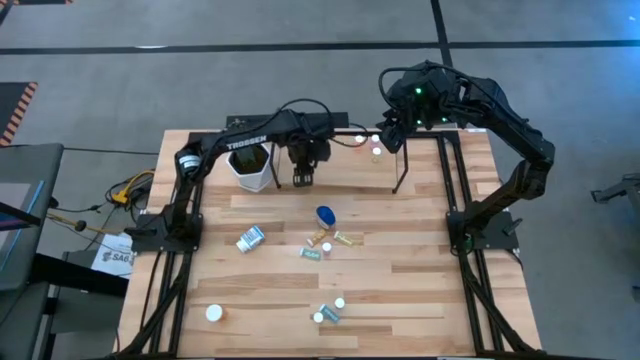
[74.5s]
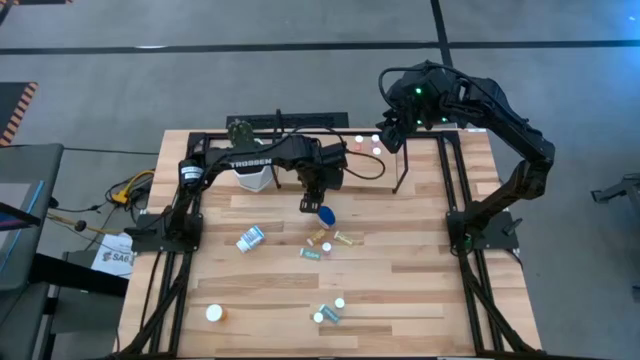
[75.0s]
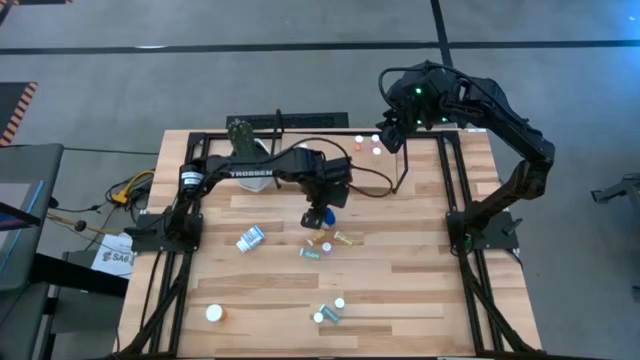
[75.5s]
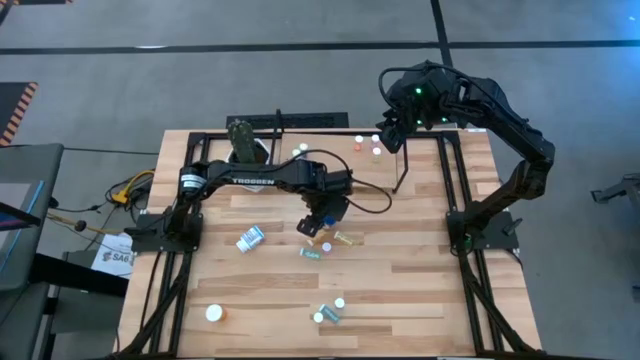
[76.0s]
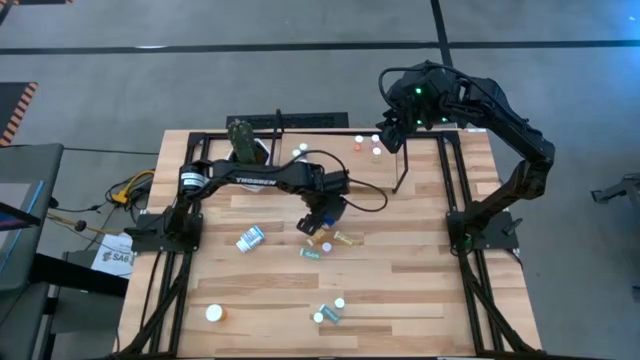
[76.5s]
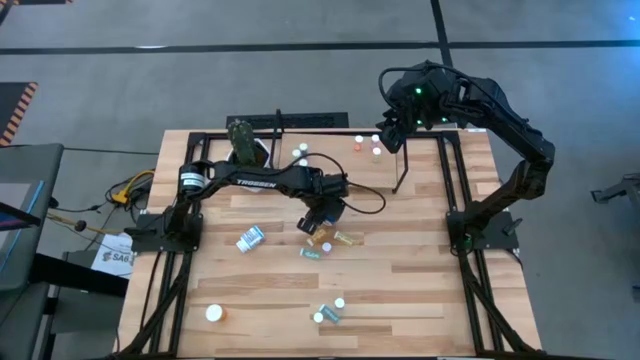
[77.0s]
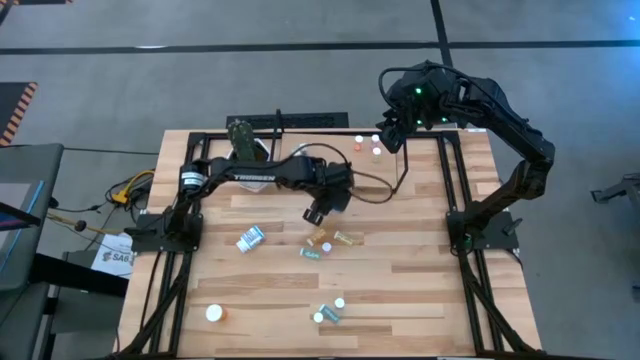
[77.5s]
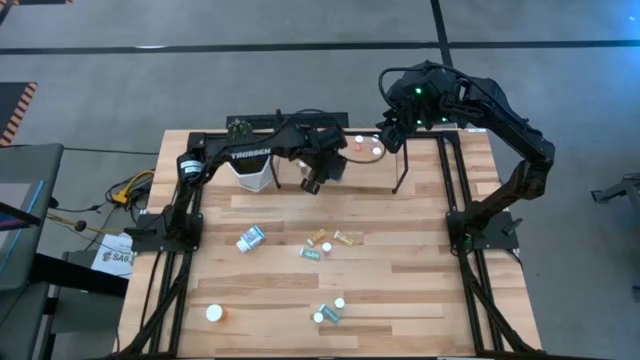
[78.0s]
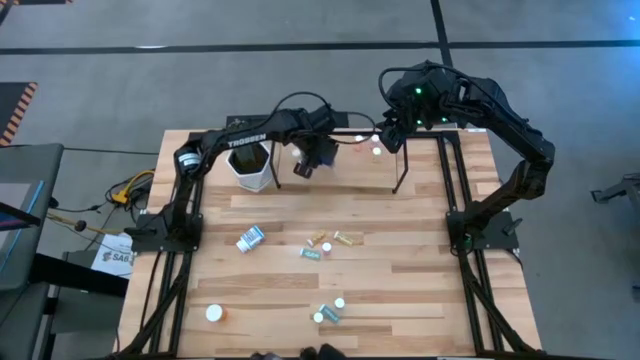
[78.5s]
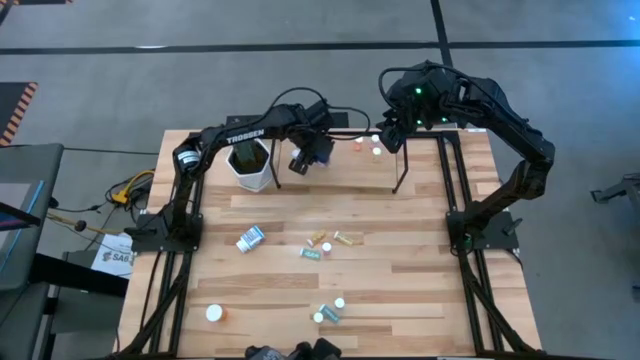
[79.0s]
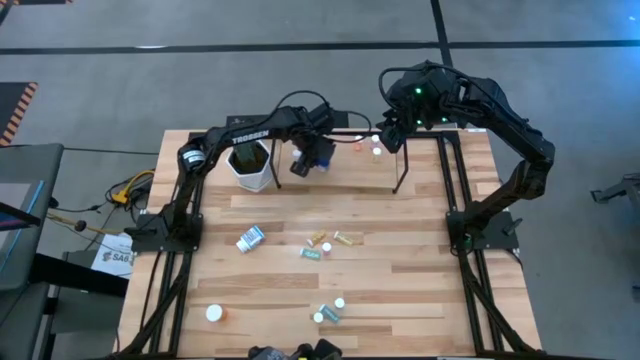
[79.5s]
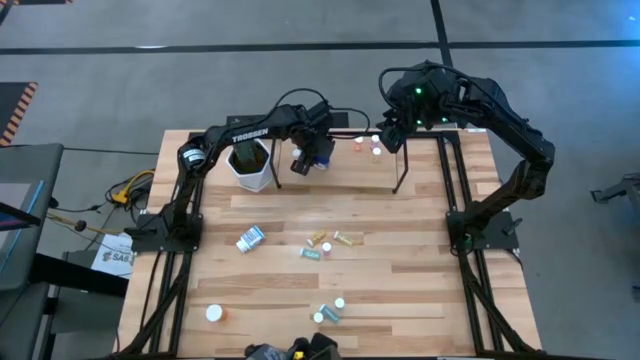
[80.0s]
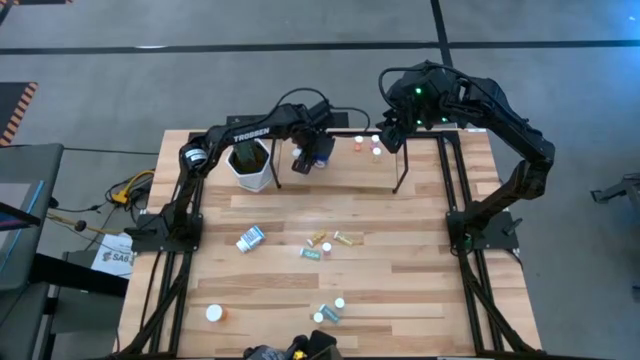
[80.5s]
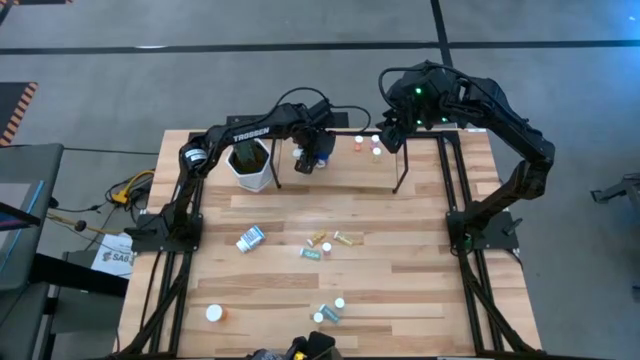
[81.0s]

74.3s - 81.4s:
Task: Pick and place medicine bottles onto shelf by color
Put the large blue pill bottle on the shelf

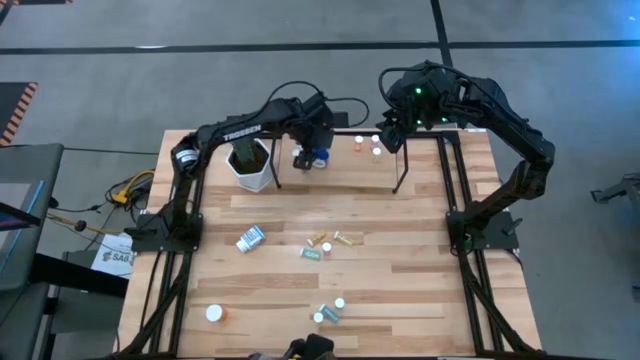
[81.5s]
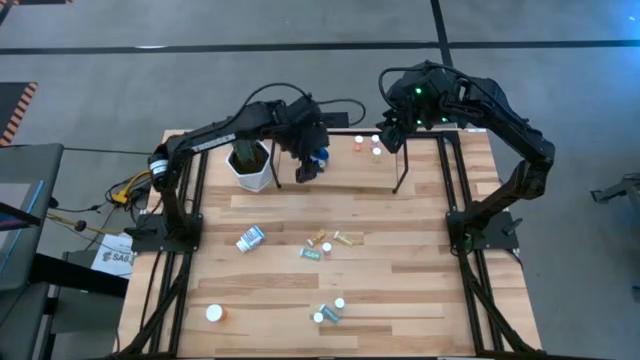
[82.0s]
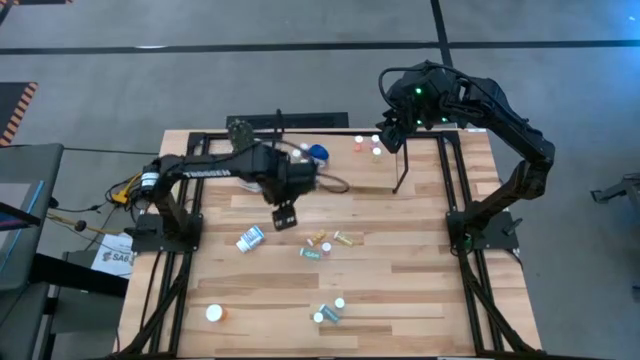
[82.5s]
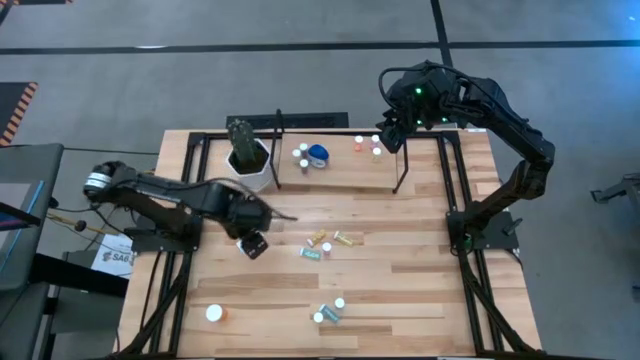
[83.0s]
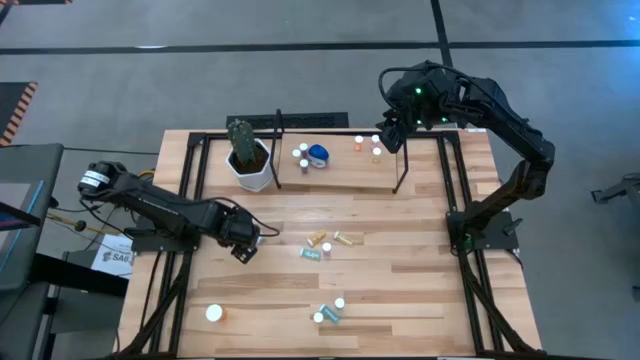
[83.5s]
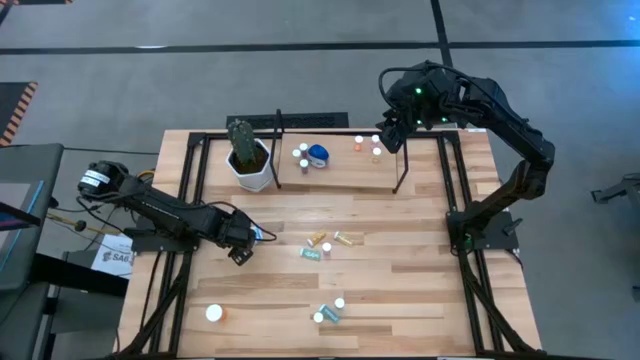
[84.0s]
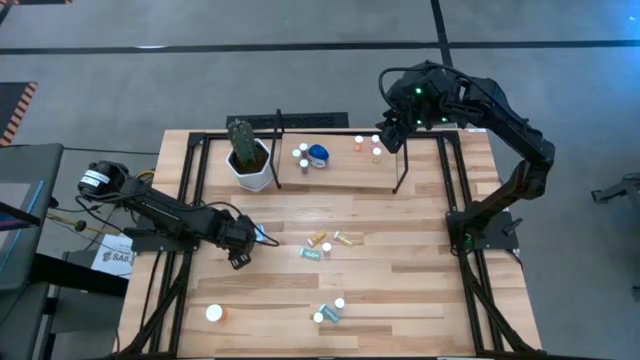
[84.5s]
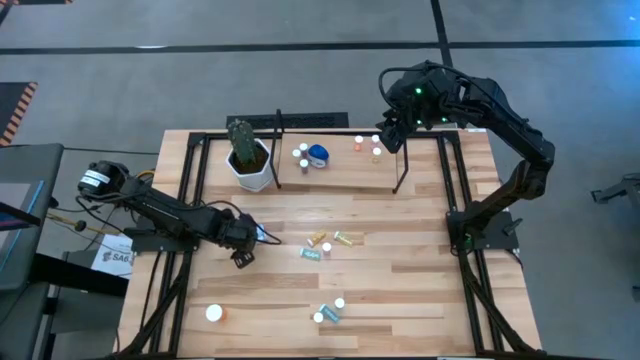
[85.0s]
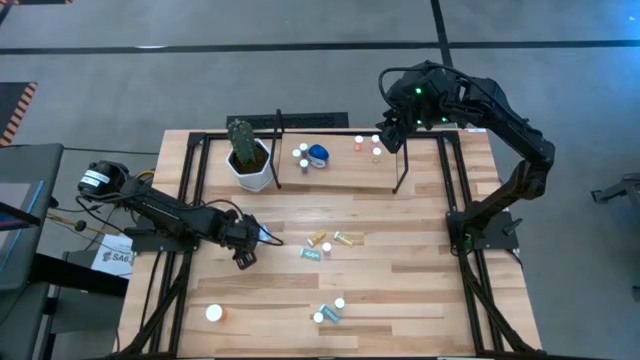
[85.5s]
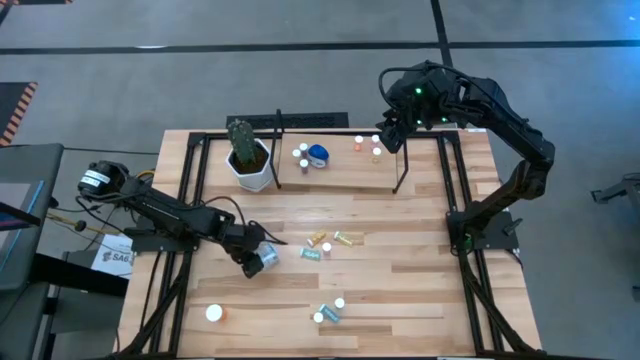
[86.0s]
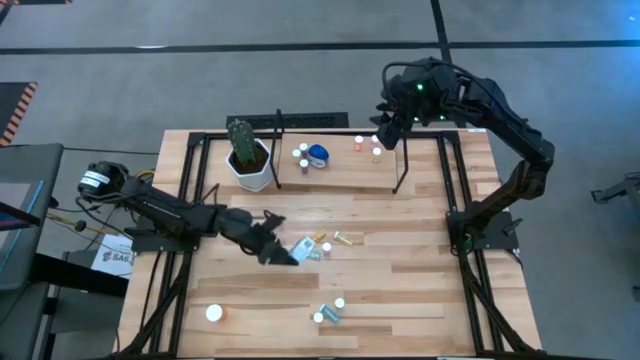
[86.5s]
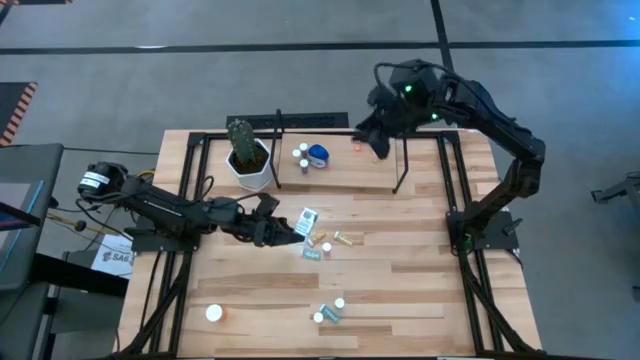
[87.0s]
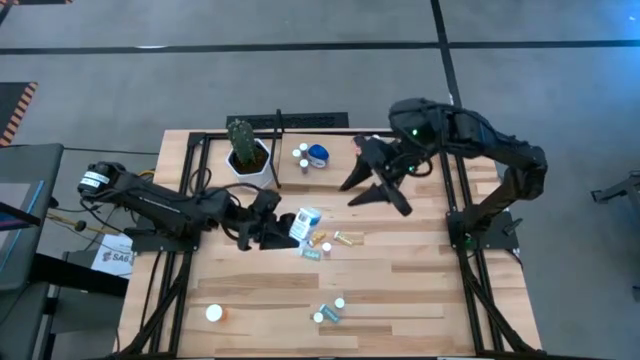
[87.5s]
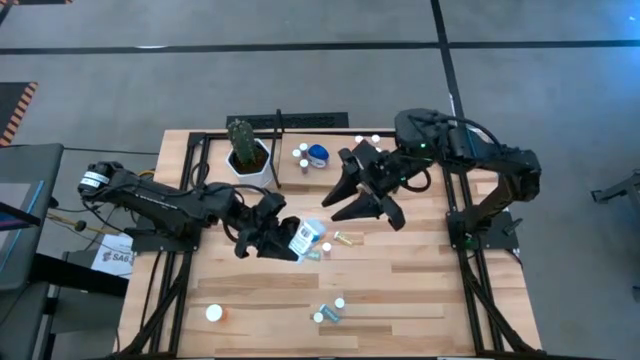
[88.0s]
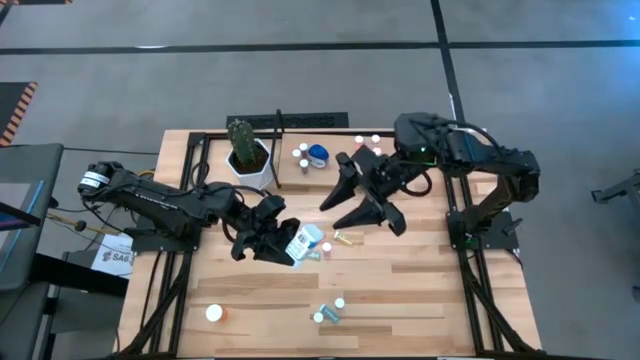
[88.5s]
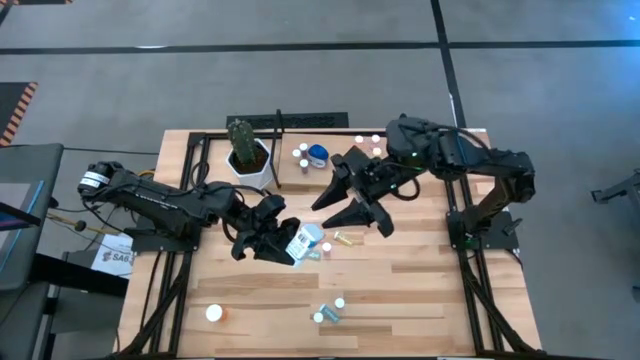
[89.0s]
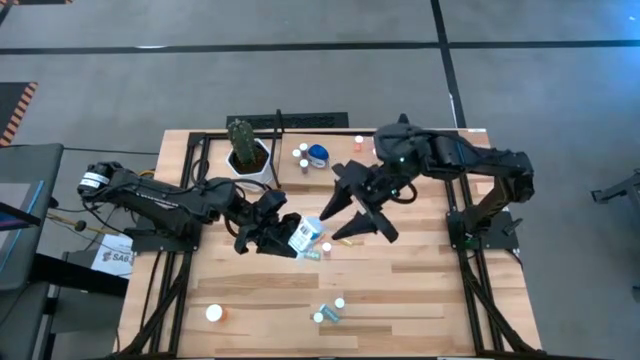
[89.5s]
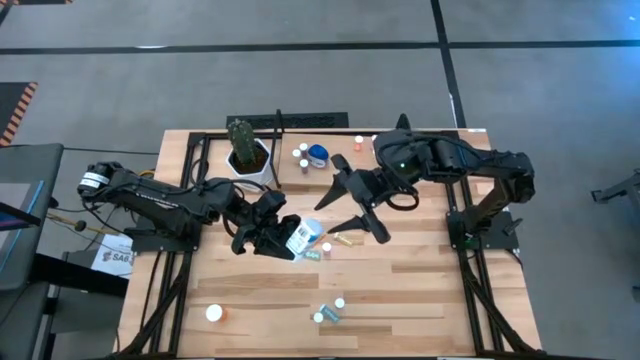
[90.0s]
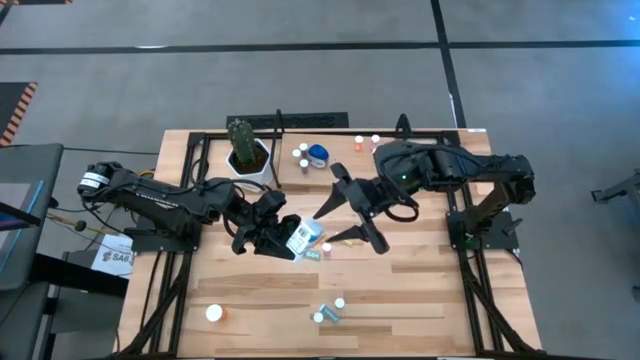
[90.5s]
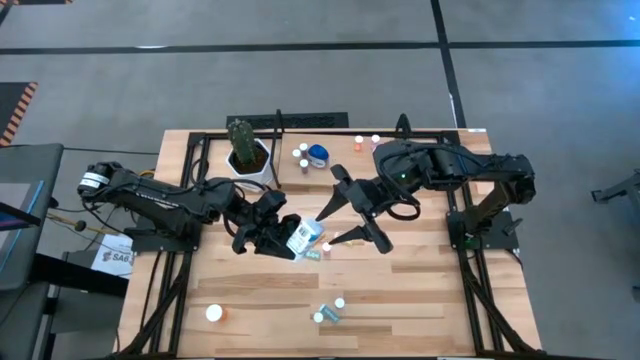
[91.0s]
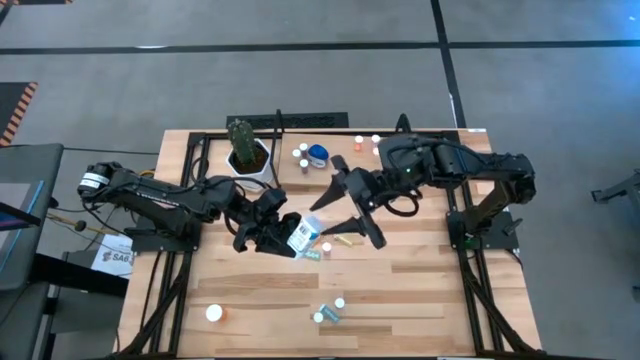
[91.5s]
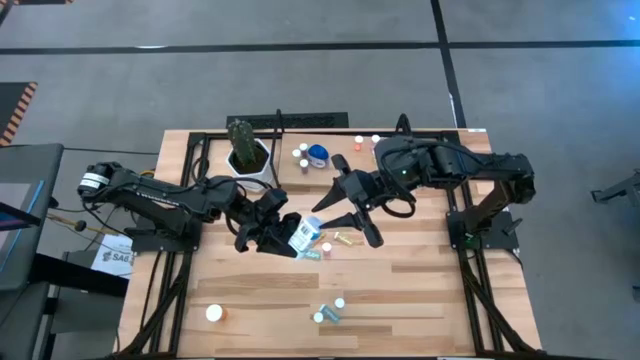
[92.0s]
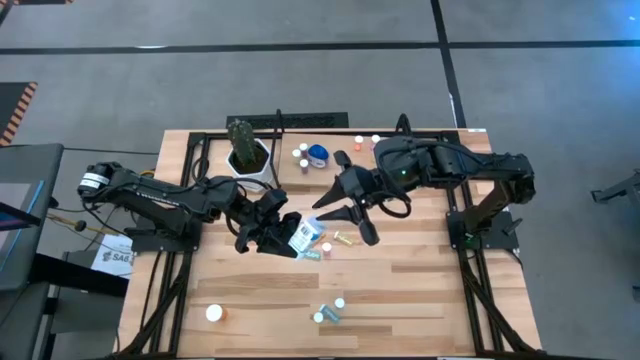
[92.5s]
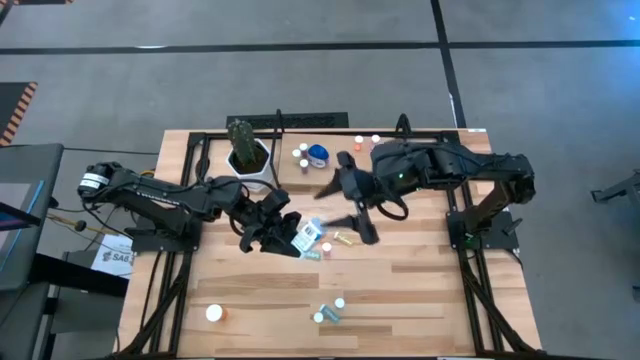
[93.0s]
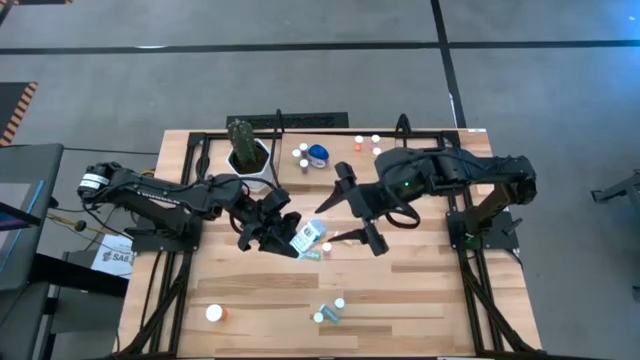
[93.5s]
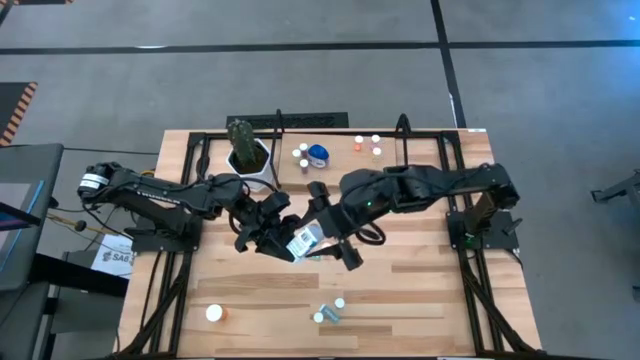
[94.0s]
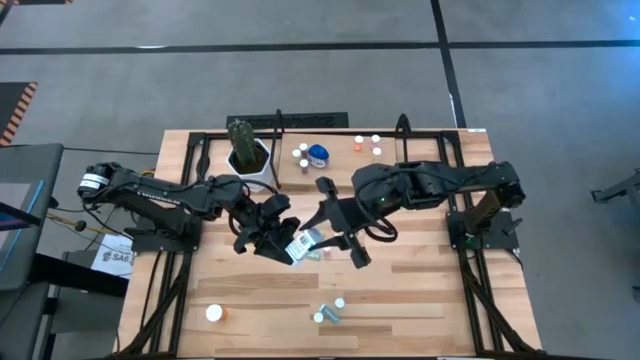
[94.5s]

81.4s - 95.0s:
Put the white pill bottle on the shelf
